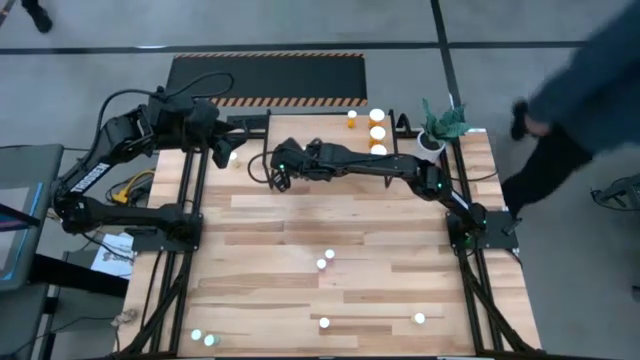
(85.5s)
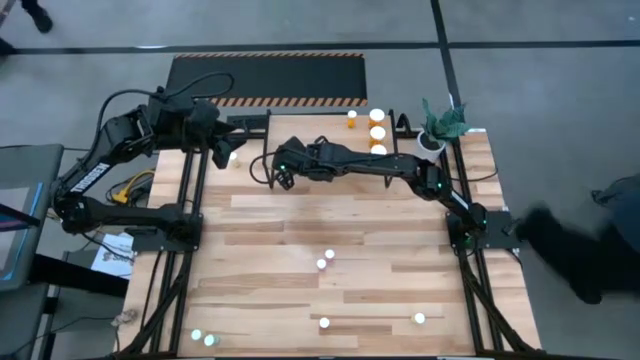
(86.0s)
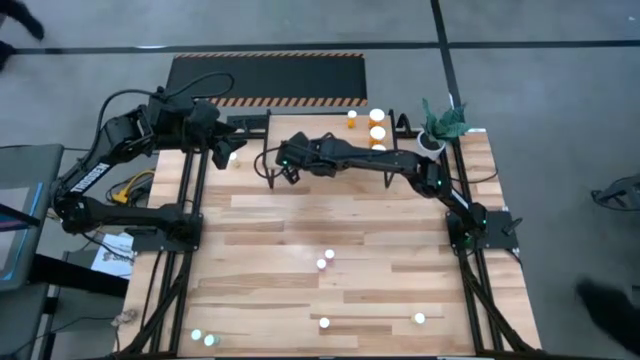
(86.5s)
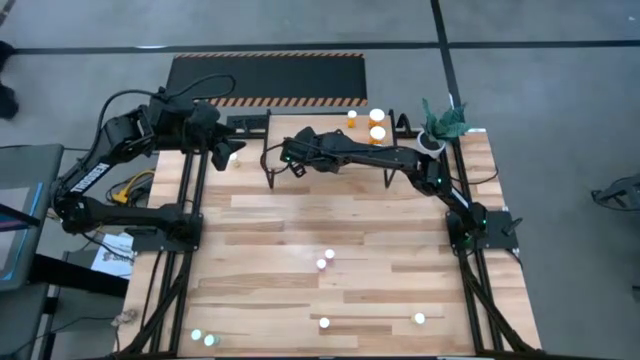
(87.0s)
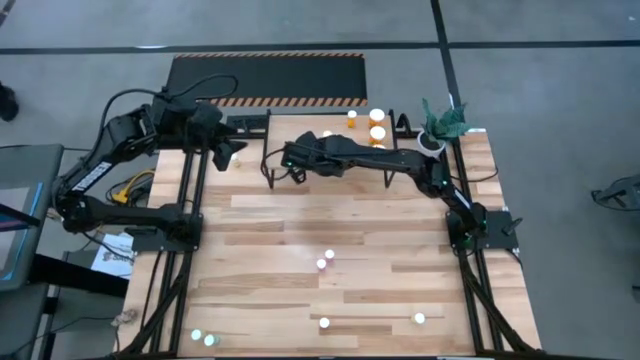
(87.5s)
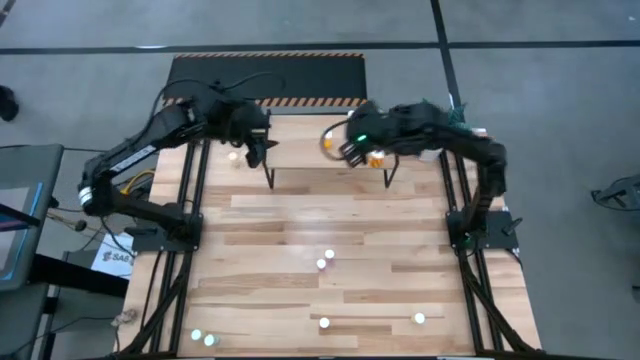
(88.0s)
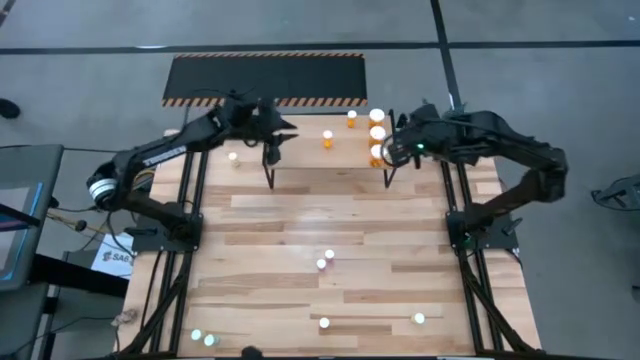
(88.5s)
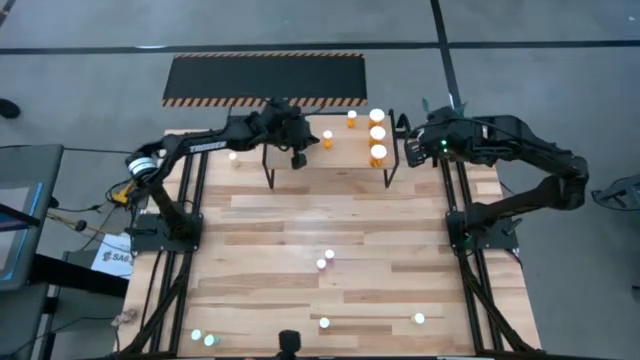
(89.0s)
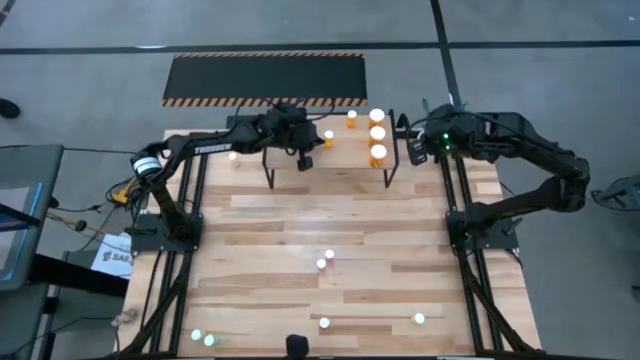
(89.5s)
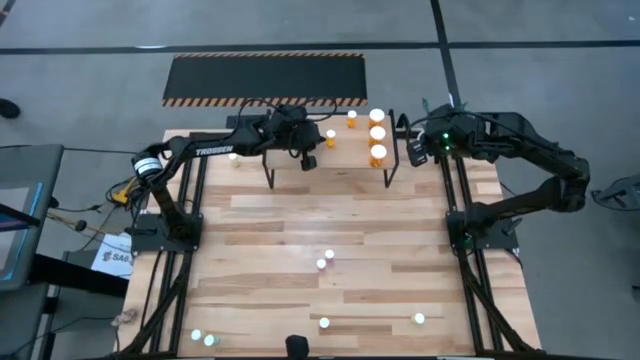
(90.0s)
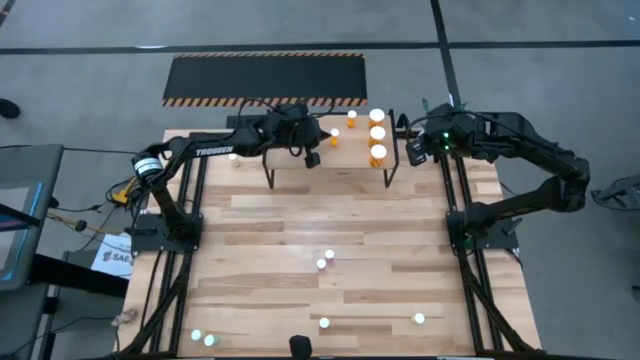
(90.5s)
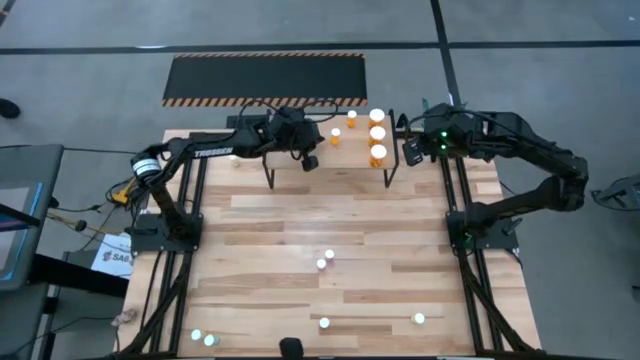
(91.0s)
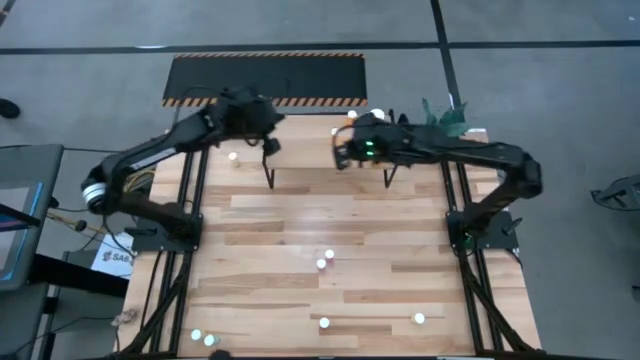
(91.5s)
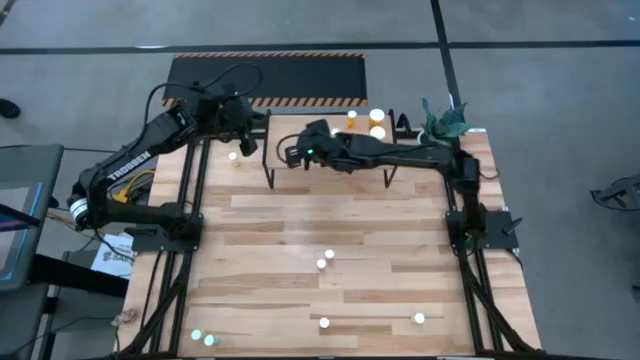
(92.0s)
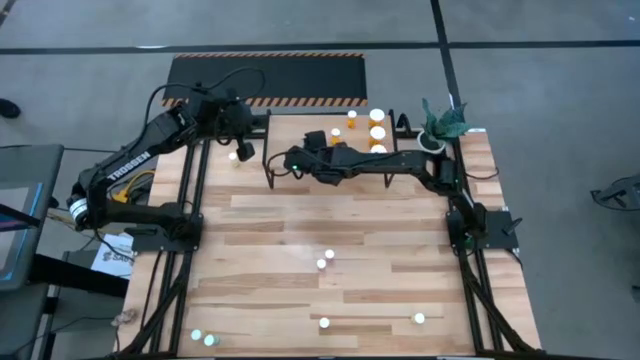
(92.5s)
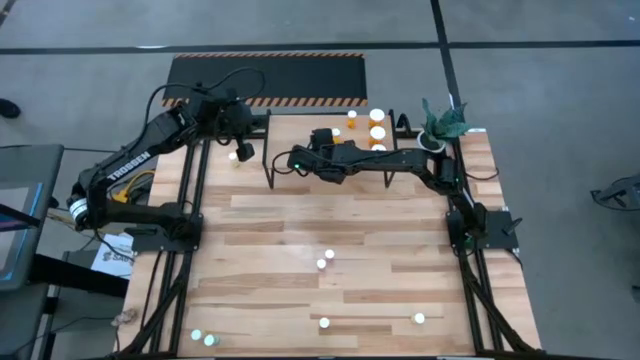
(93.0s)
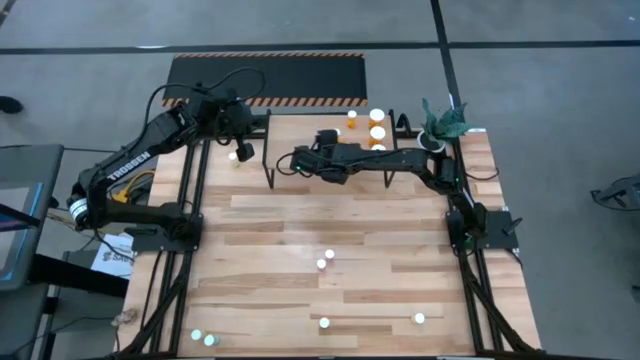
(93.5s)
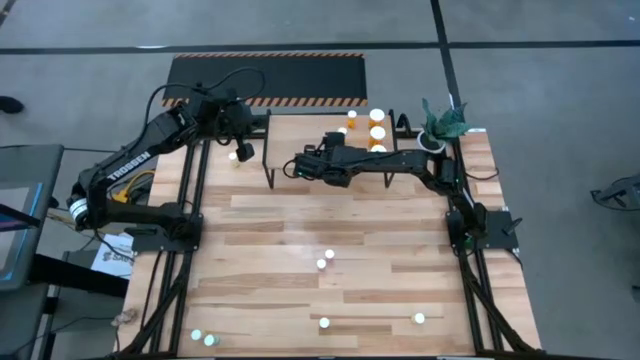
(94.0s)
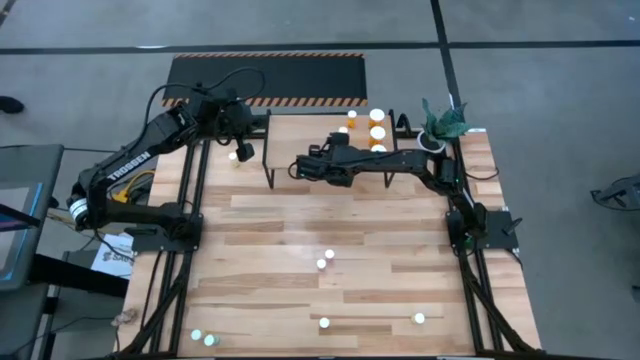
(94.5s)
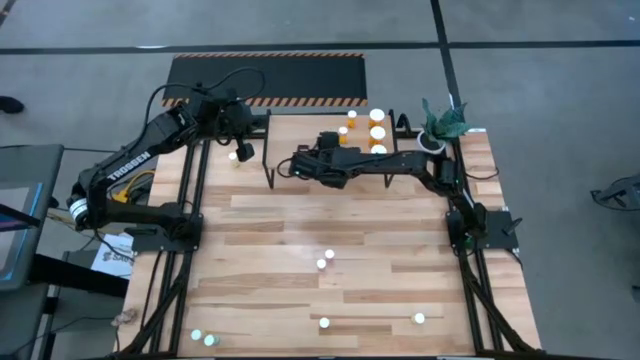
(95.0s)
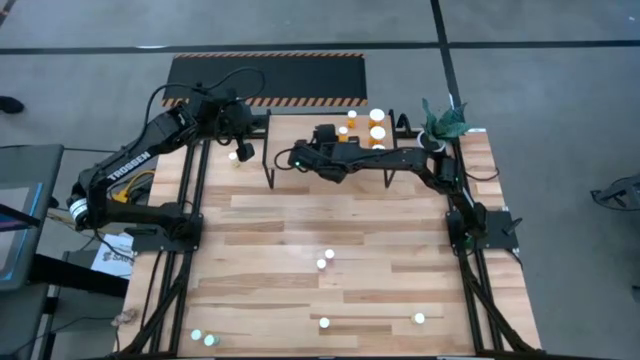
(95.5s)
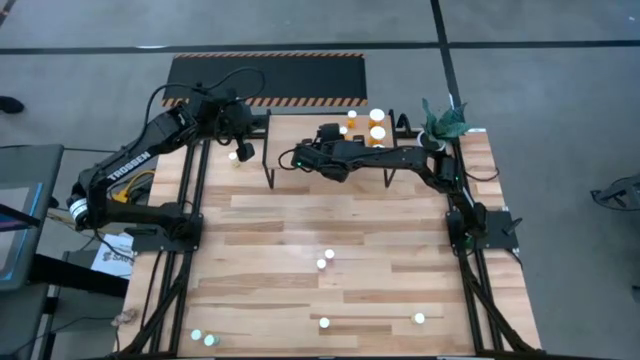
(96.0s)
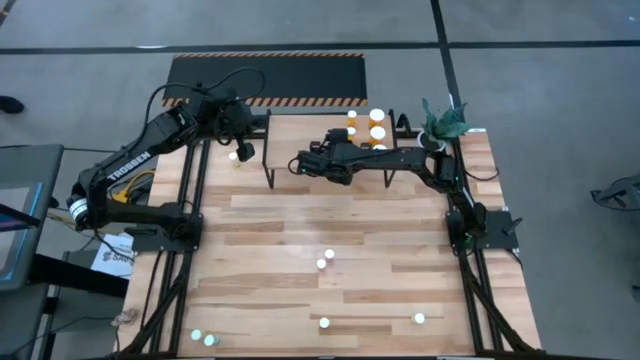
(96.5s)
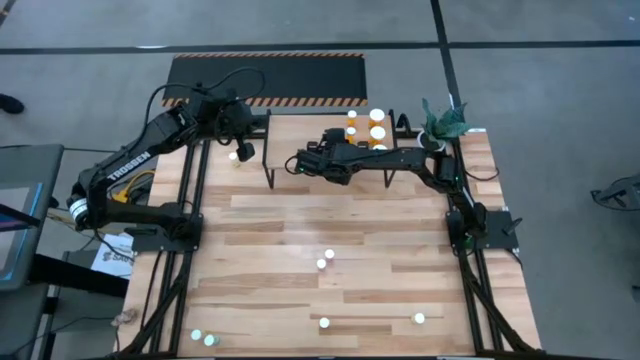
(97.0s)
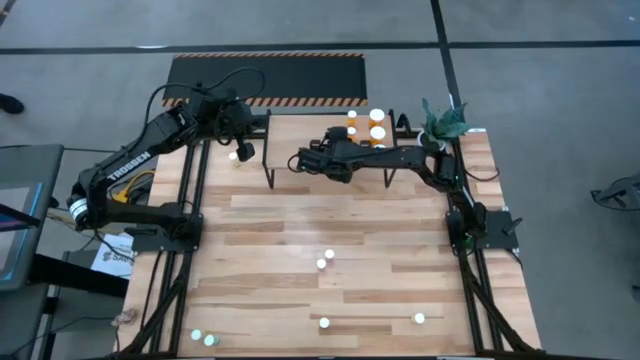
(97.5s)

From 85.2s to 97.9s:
Task: Pick and place medicine bottles onto shelf by color
Put the top small orange pill bottle on the shelf aligned with the other small orange pill bottle

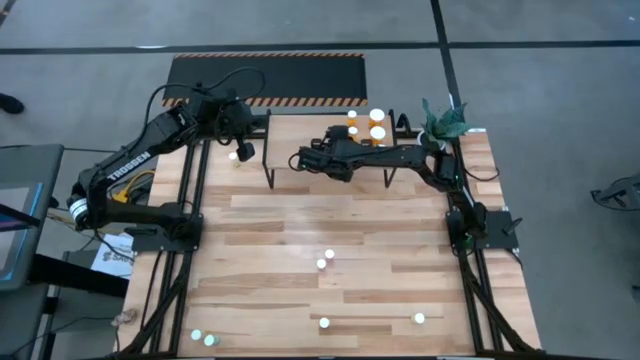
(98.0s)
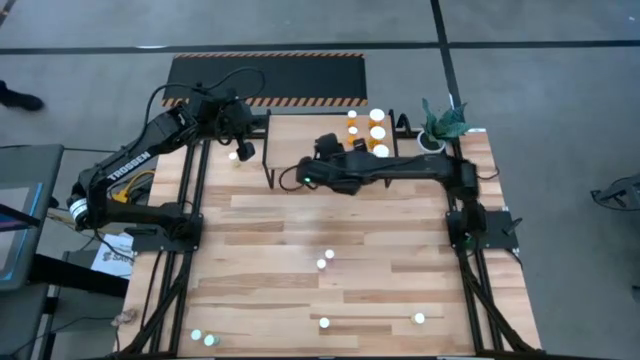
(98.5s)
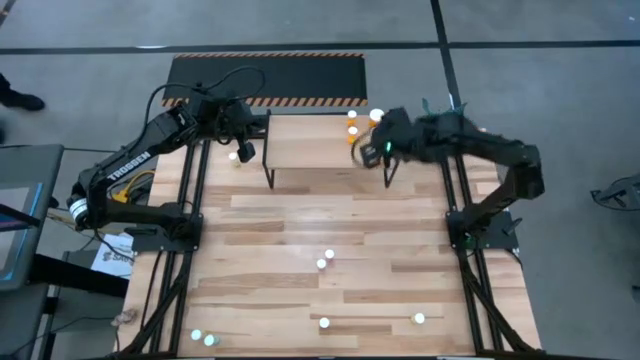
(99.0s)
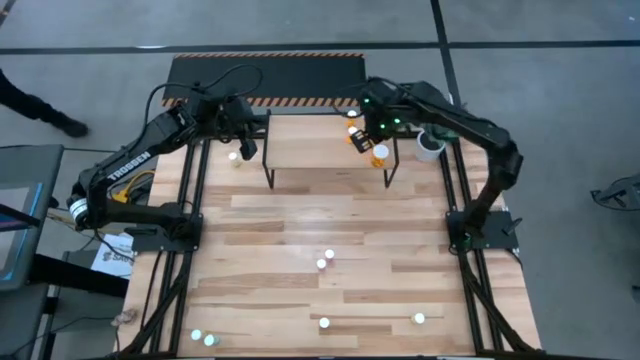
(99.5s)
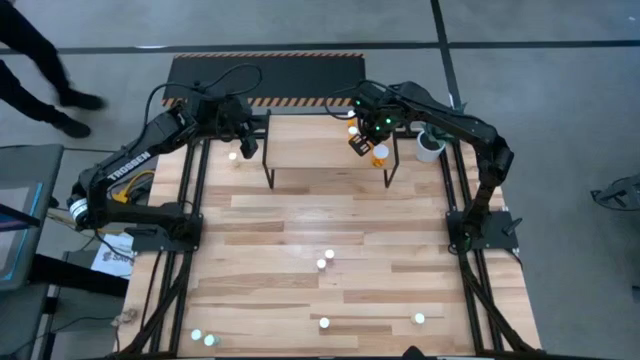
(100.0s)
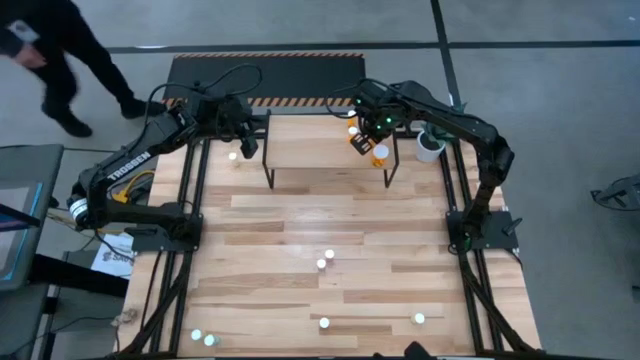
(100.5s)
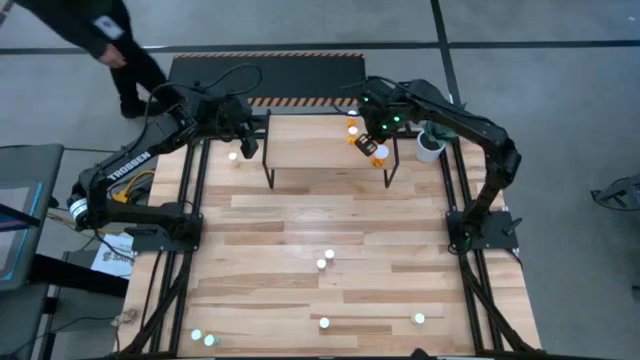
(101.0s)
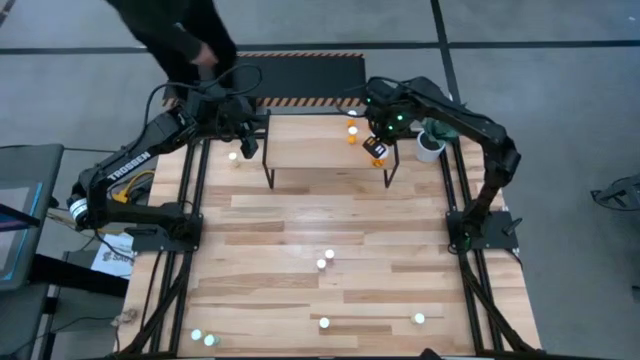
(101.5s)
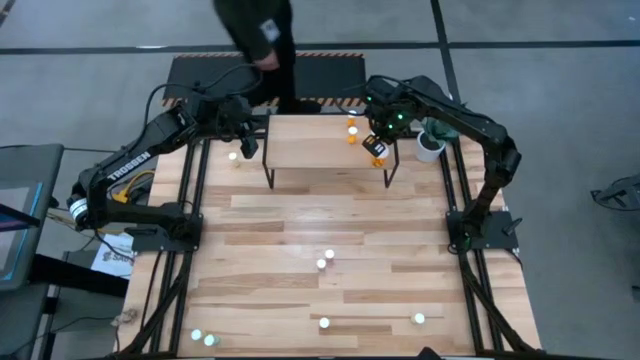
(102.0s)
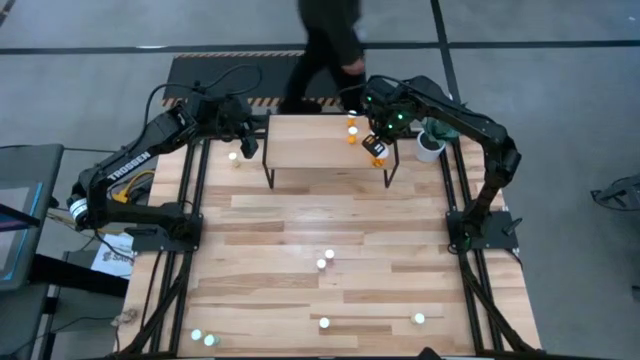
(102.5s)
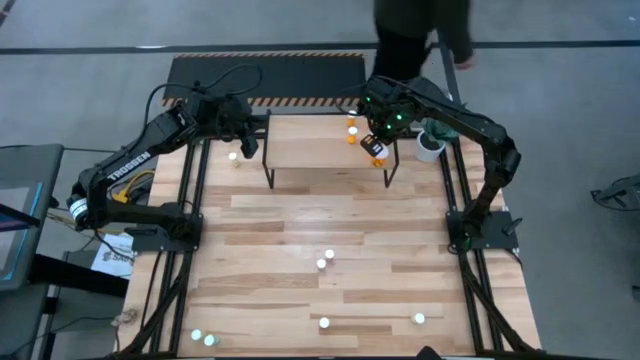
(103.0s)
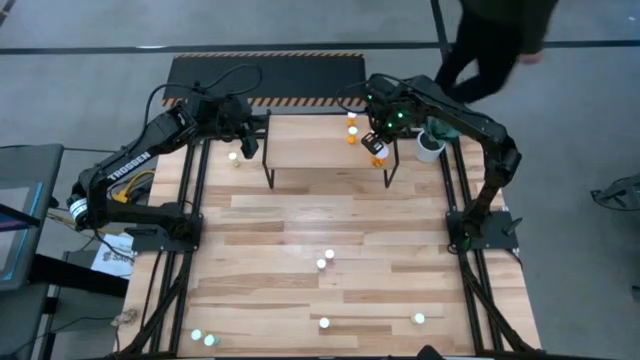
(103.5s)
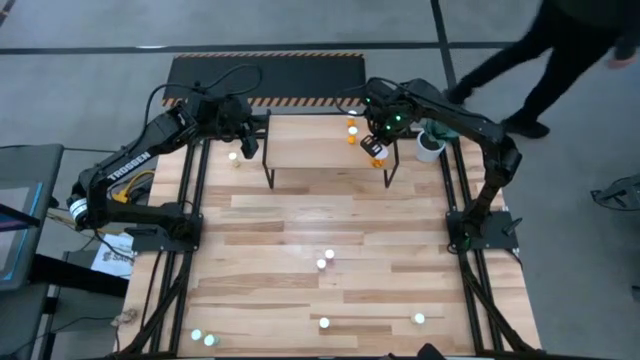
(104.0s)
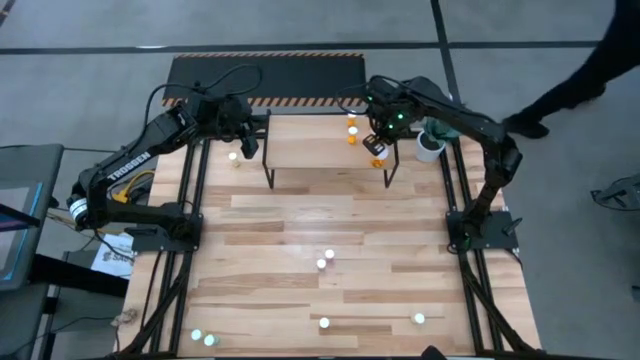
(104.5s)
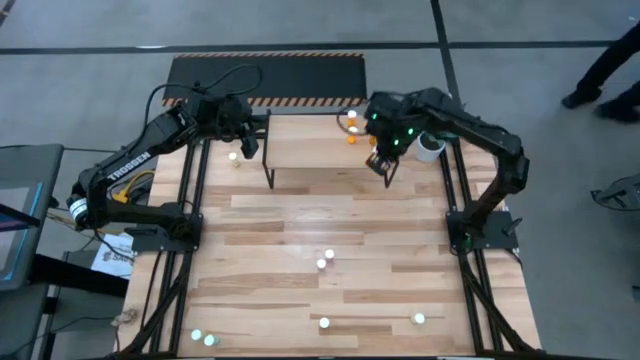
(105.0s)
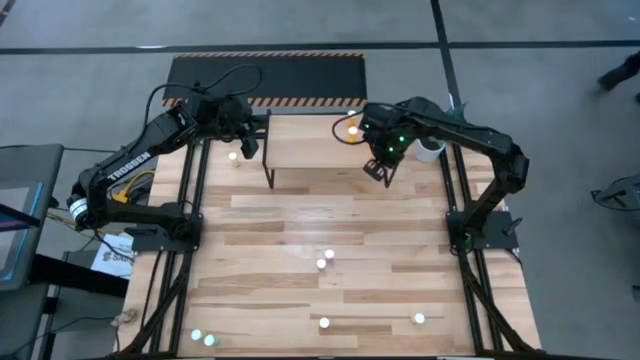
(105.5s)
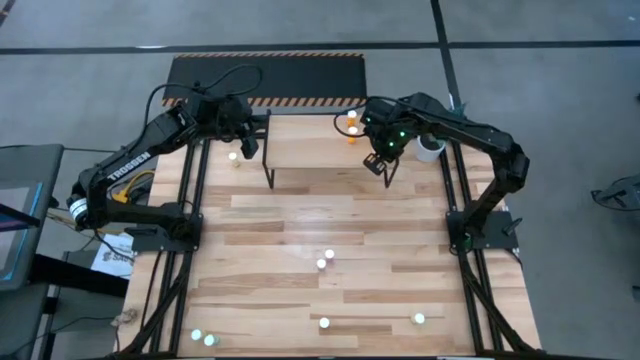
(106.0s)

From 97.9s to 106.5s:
Adjust the large orange pill bottles on the shelf

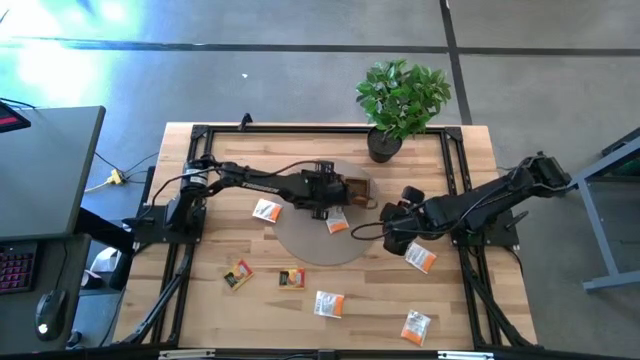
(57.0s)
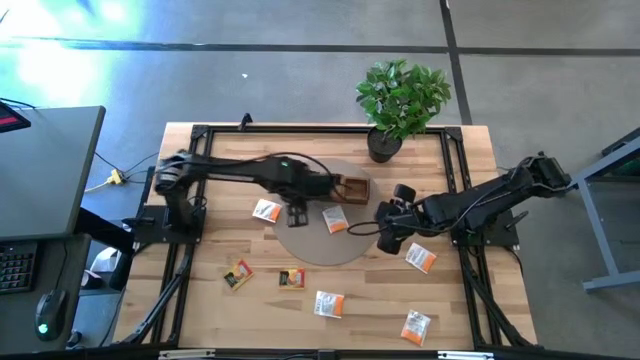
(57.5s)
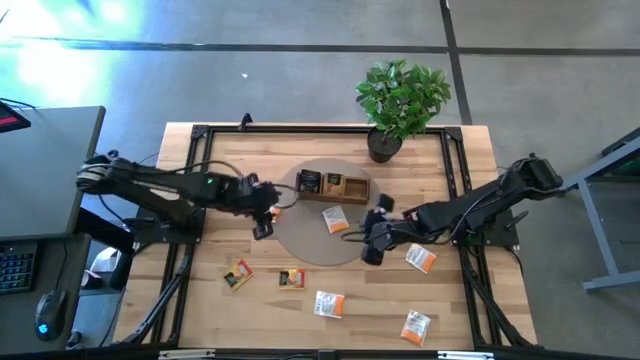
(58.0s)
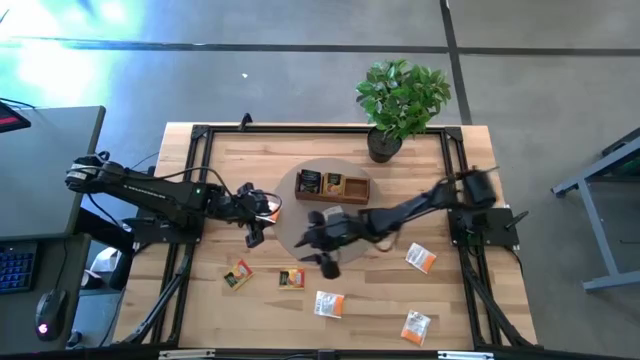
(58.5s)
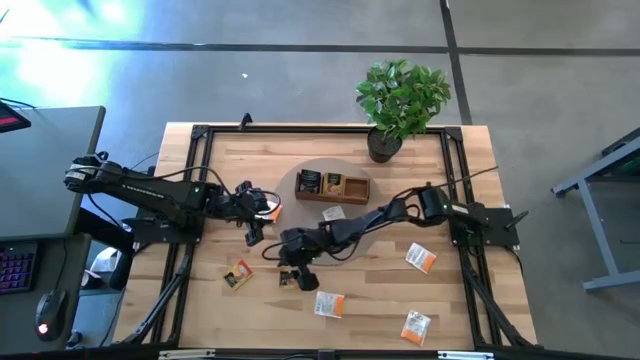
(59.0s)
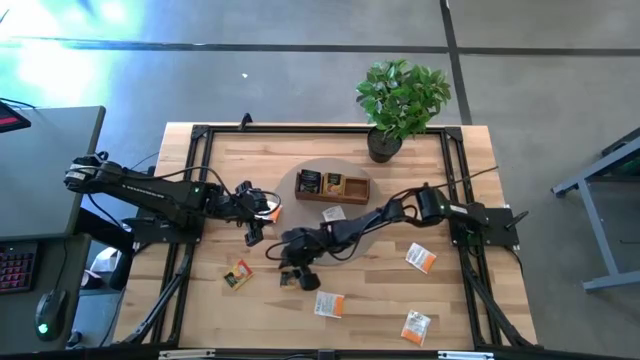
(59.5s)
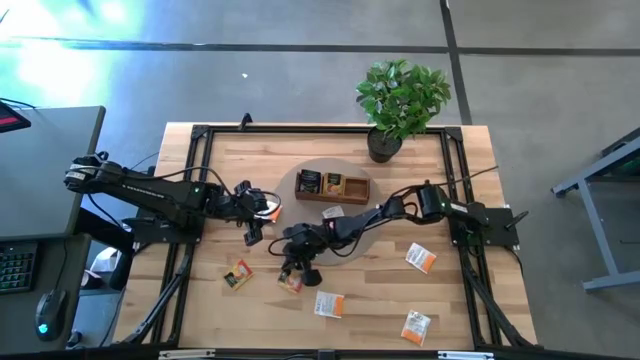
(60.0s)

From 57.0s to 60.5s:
Task: Pick & Place Tea
Put the orange tea bag into the middle area of the wooden organizer
